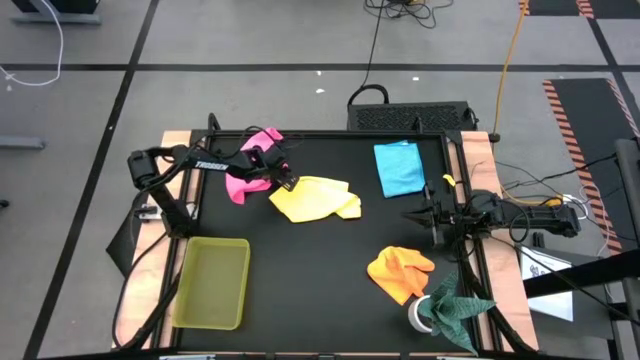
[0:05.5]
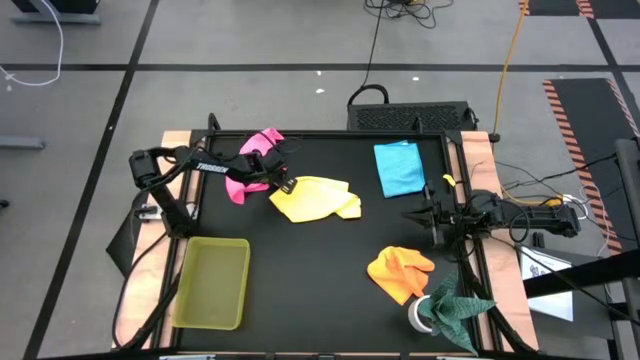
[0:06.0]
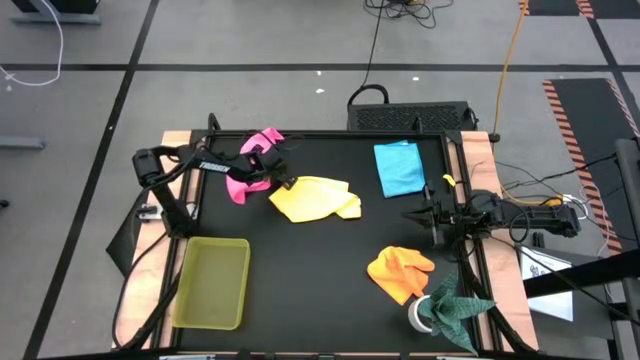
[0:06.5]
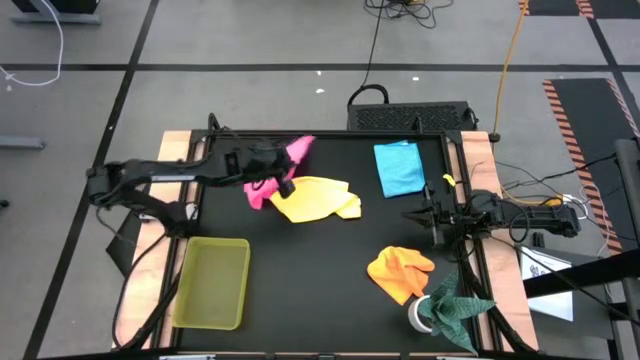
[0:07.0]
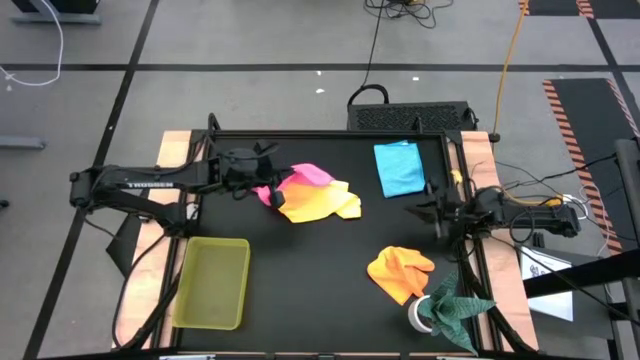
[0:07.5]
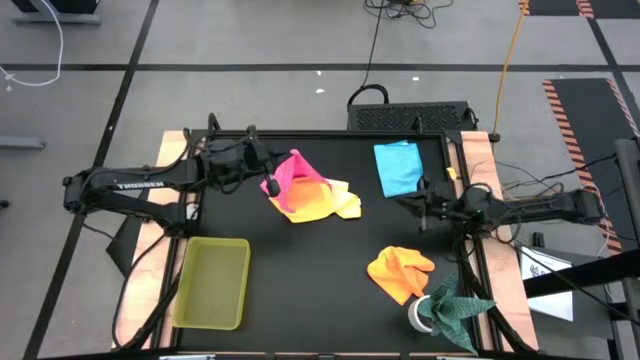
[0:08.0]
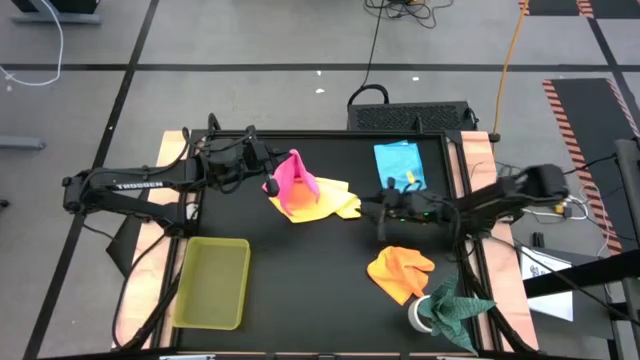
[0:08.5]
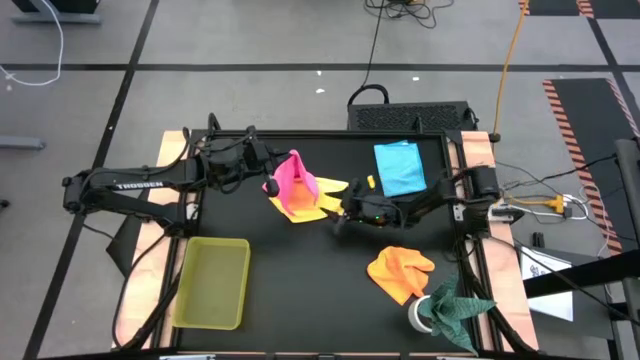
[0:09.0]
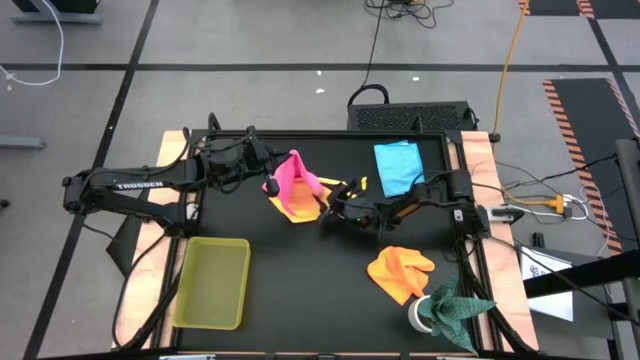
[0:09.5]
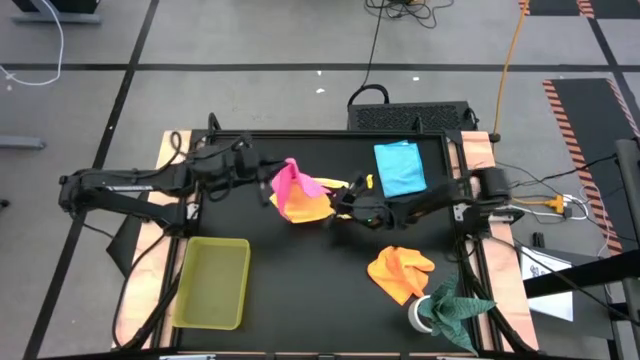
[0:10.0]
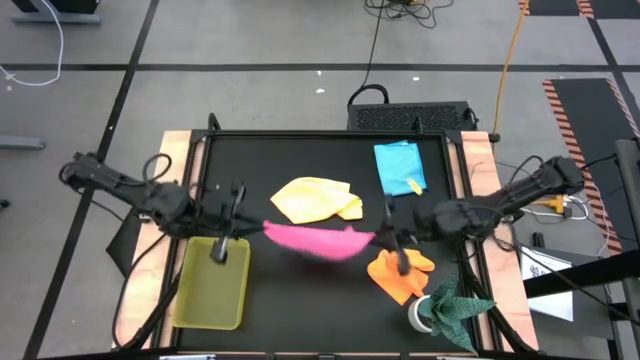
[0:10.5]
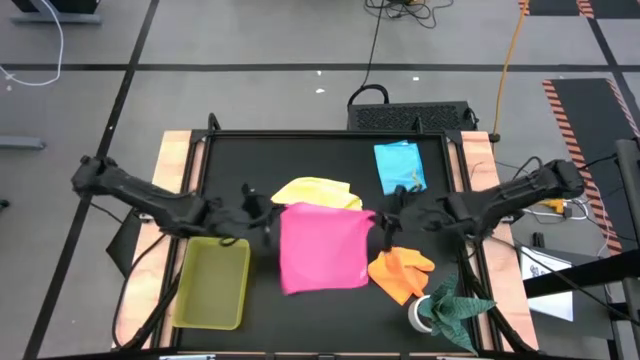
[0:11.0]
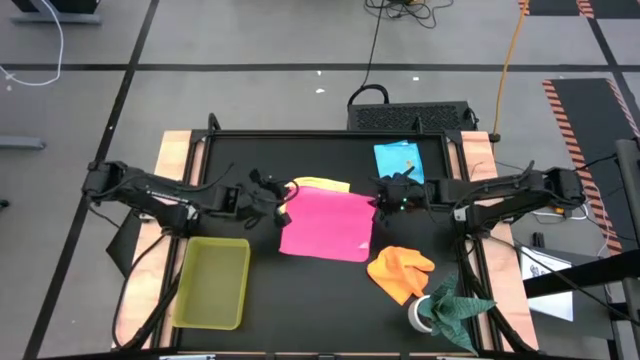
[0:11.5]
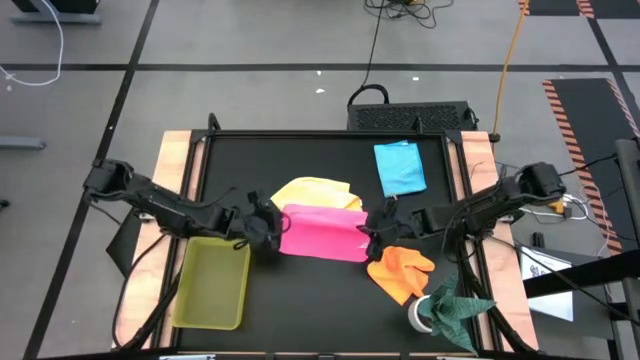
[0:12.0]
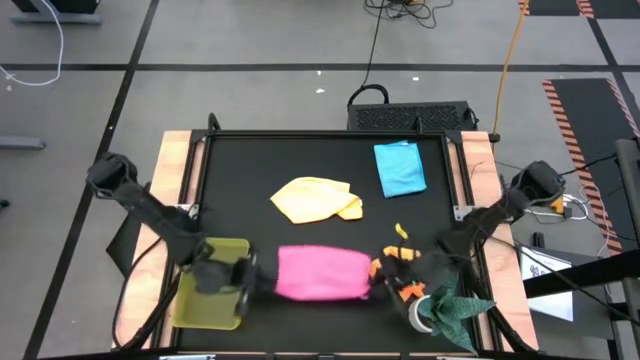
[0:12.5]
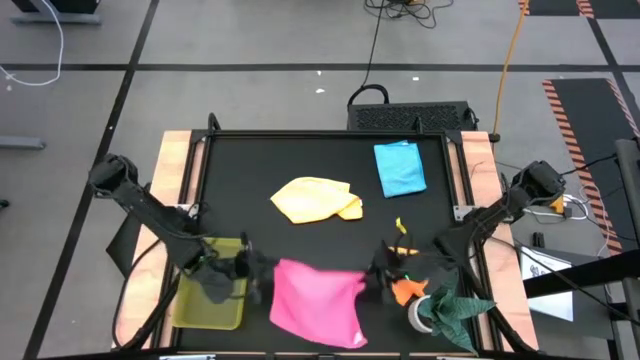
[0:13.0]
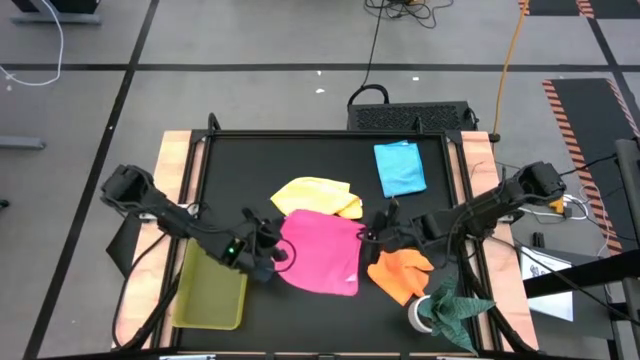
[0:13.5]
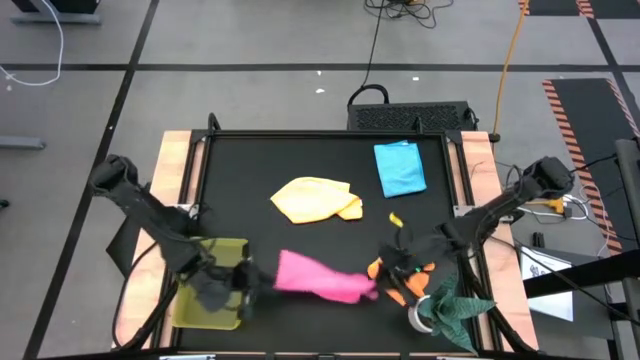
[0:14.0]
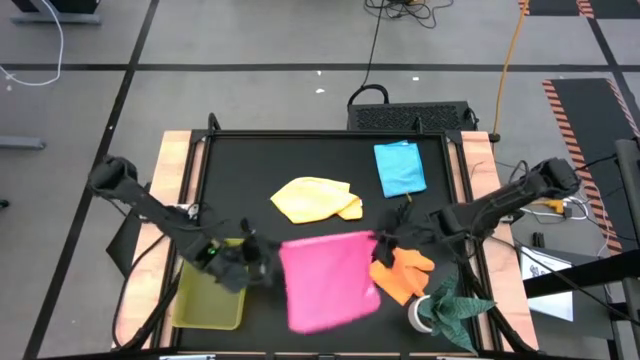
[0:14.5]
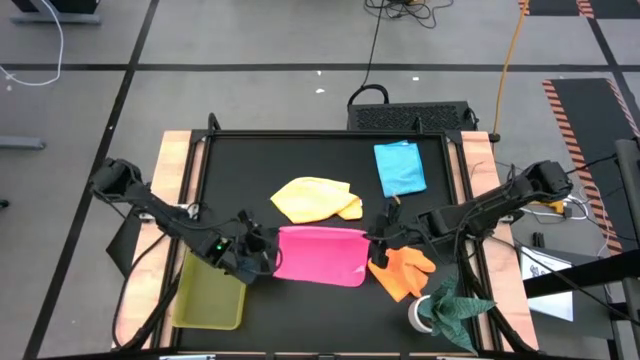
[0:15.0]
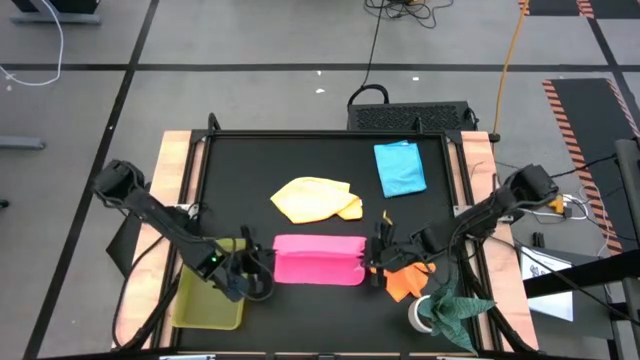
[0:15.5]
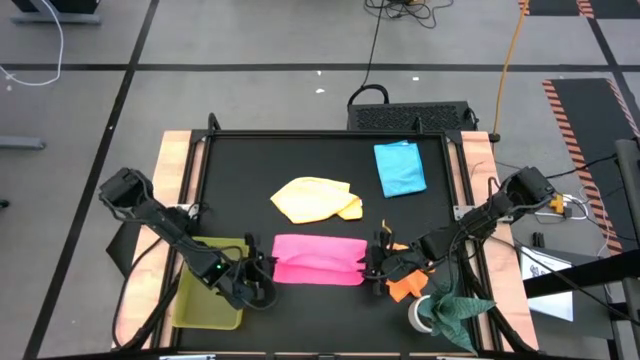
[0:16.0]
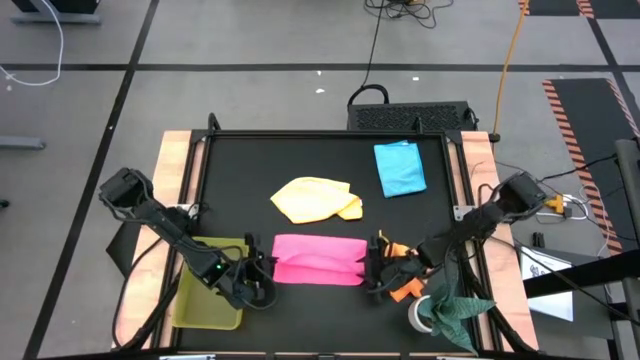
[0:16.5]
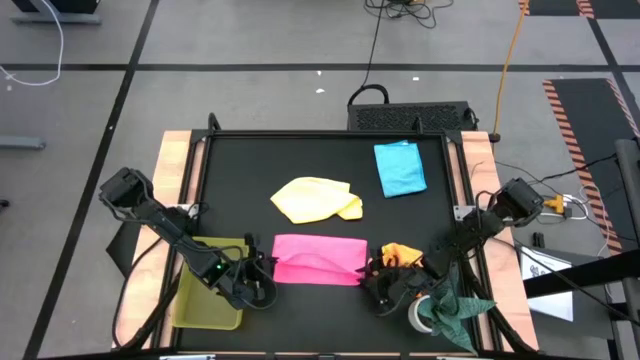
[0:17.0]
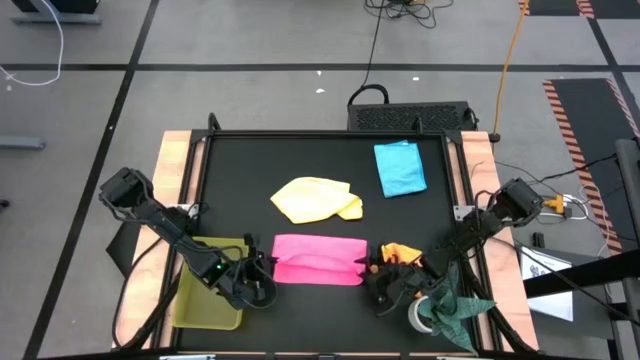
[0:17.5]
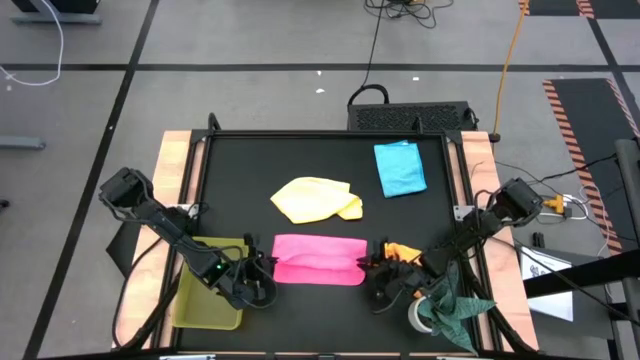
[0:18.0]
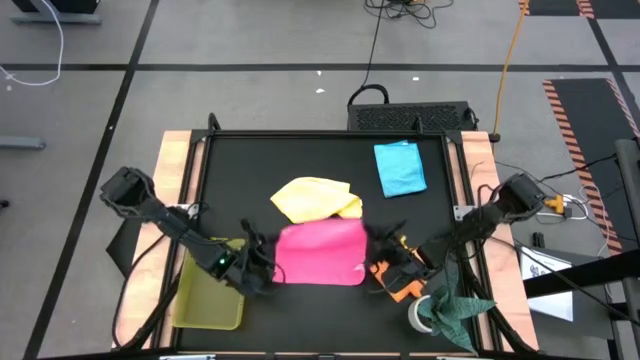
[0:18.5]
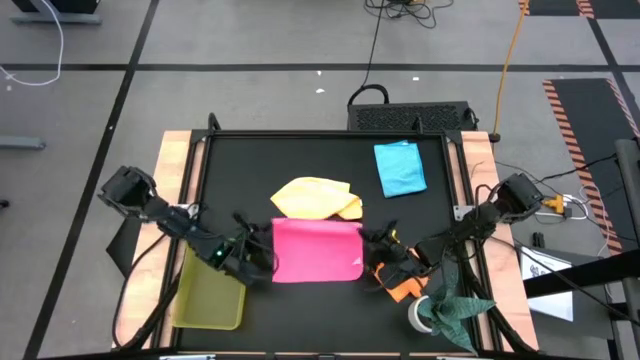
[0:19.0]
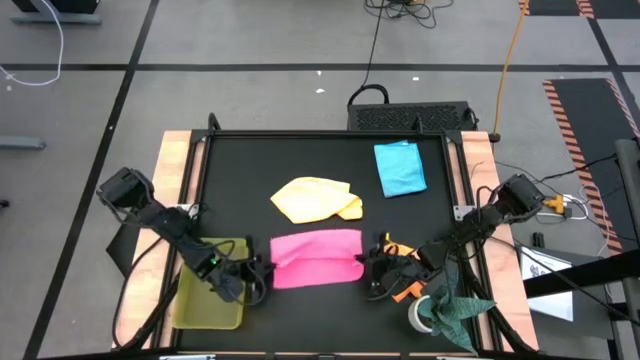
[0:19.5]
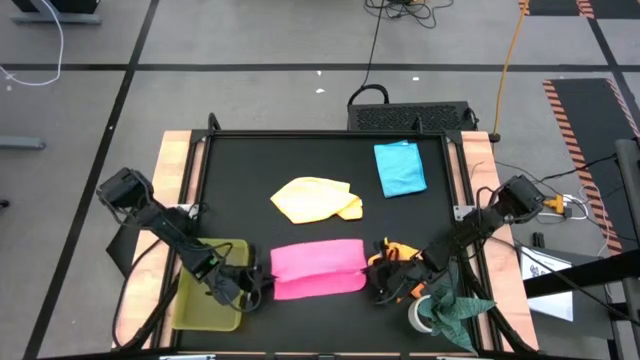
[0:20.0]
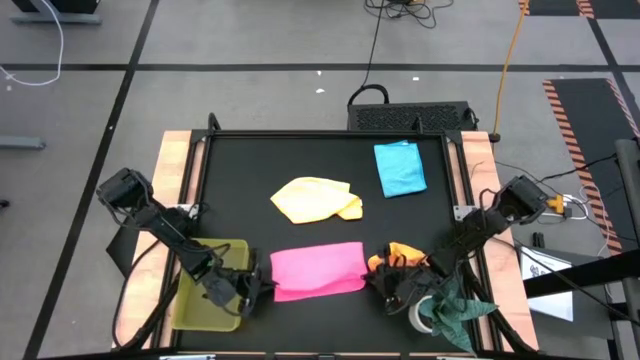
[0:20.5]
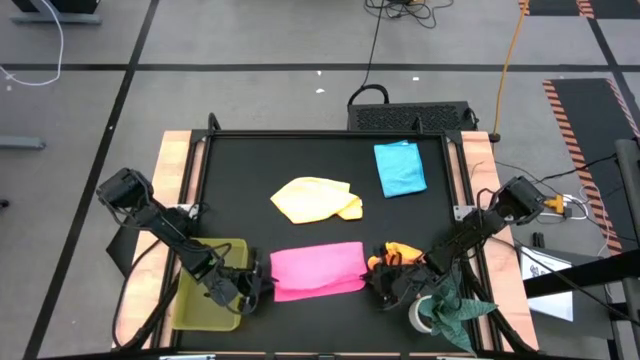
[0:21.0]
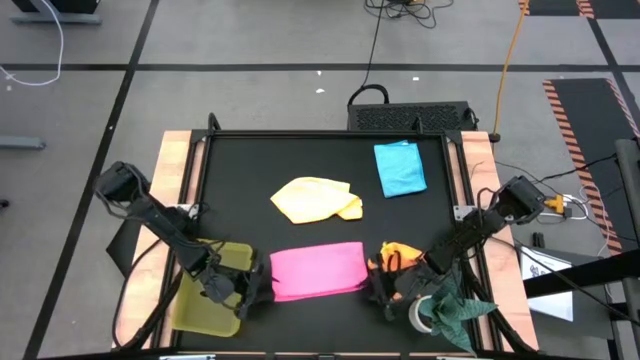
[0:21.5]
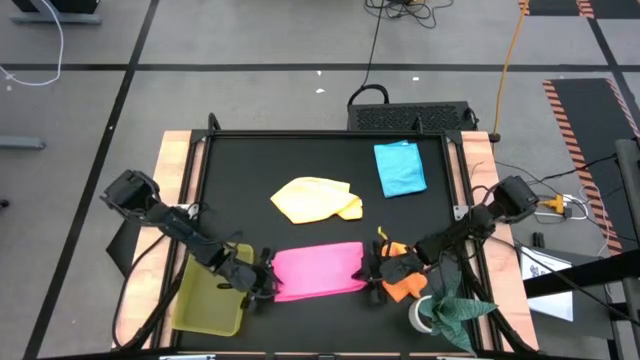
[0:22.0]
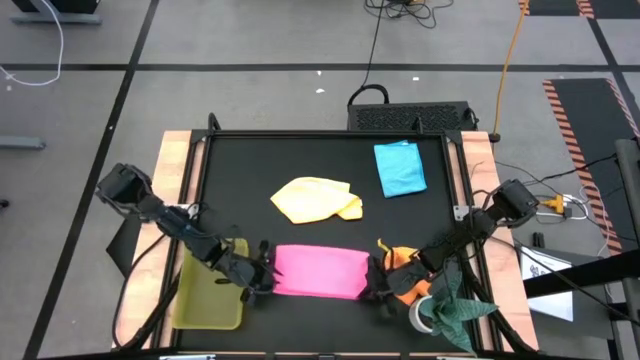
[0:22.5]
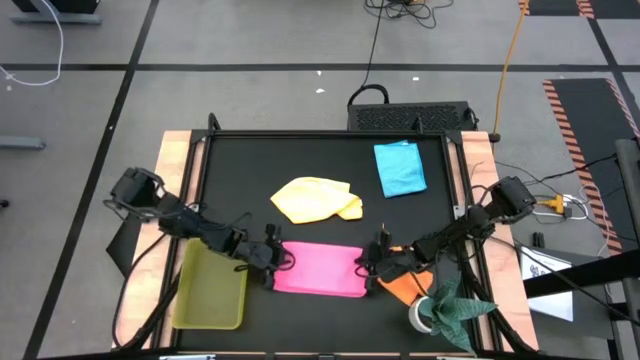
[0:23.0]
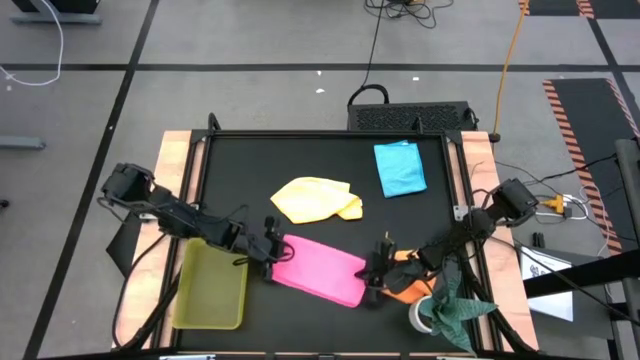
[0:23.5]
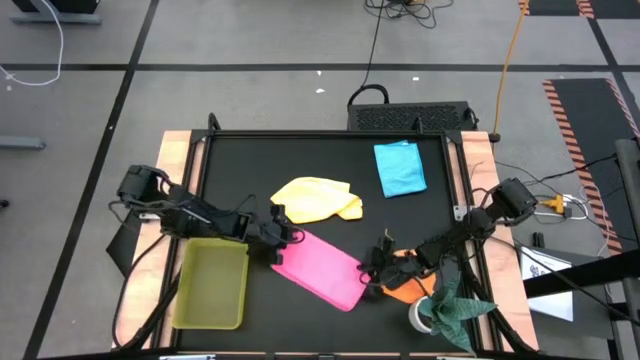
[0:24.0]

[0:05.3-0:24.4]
Task: Fold microfiber towels
Fold the pink microfiber towel

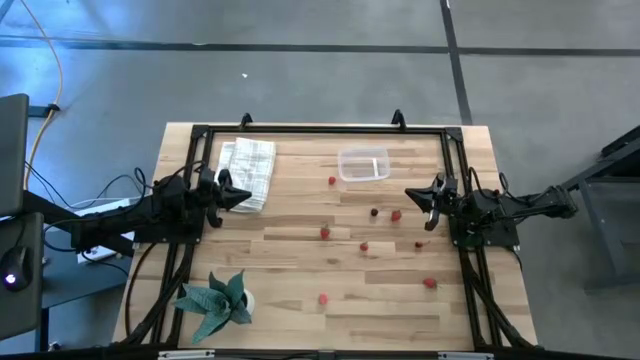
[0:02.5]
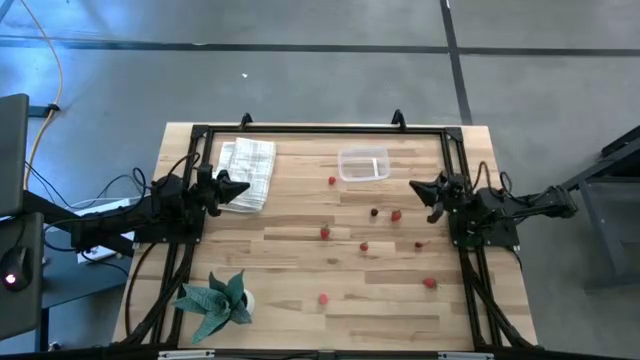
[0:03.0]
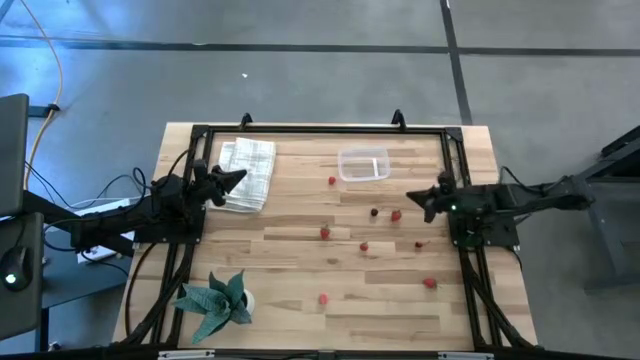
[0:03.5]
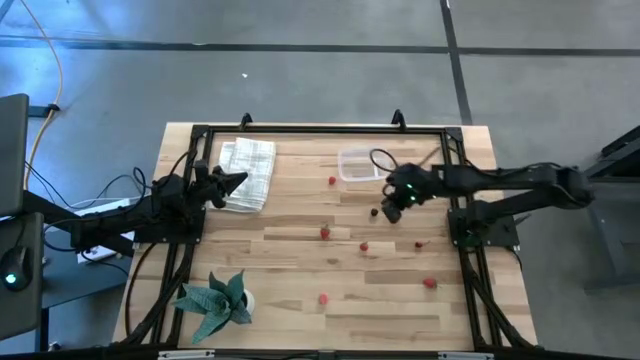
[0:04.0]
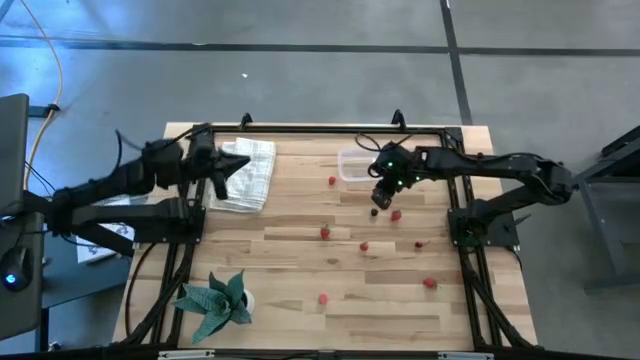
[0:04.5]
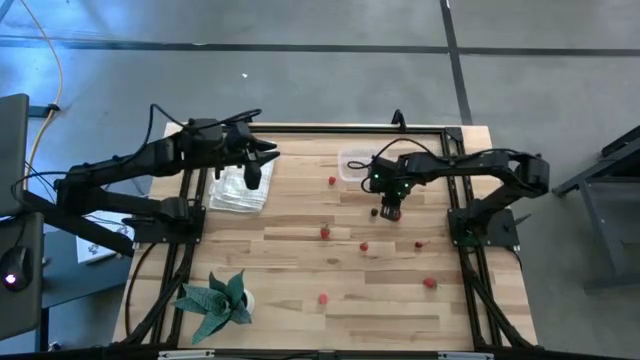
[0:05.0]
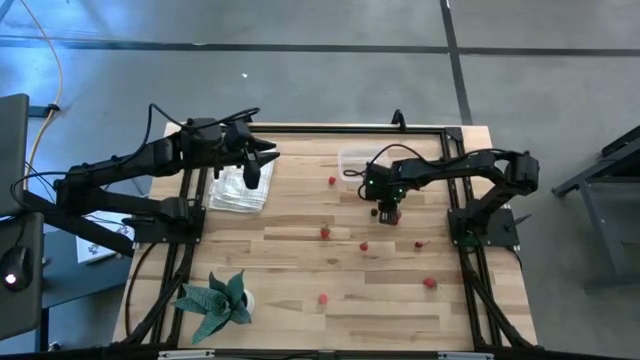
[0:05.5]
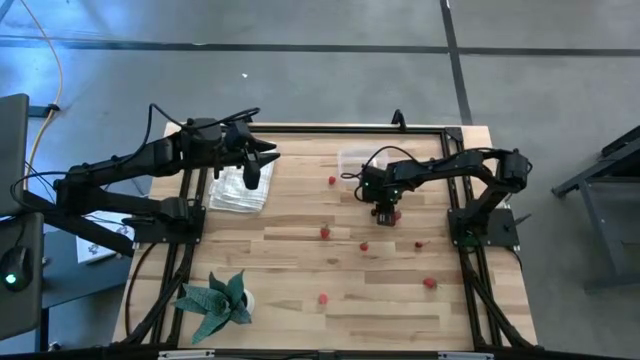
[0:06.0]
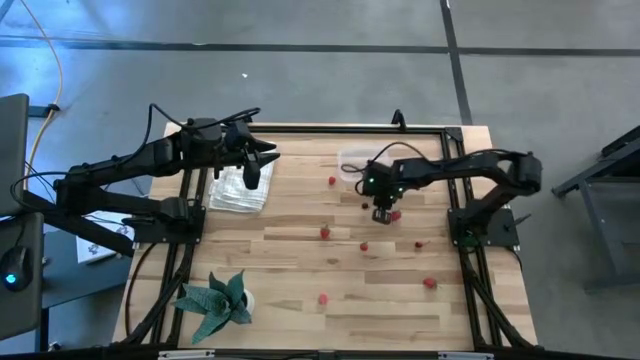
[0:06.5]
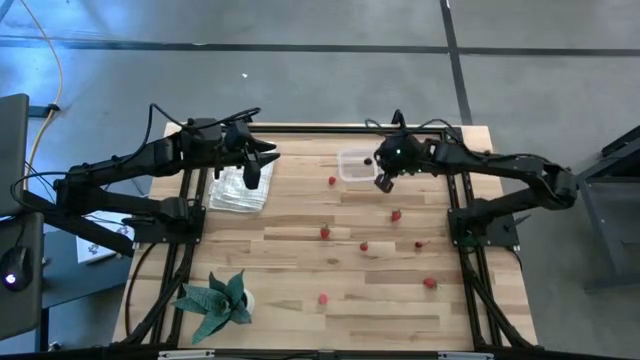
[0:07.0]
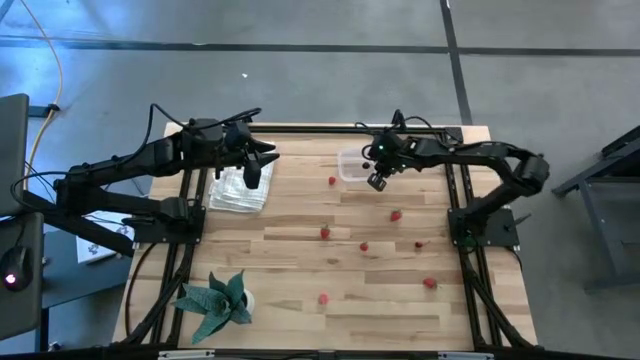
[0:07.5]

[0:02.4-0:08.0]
Task: Pick and placing Produce into tupperware
Put the black cherry into the transparent container
